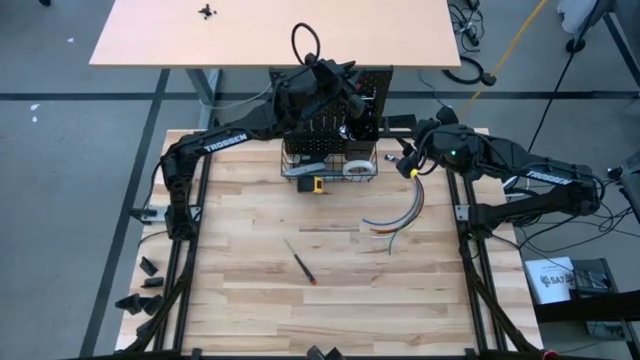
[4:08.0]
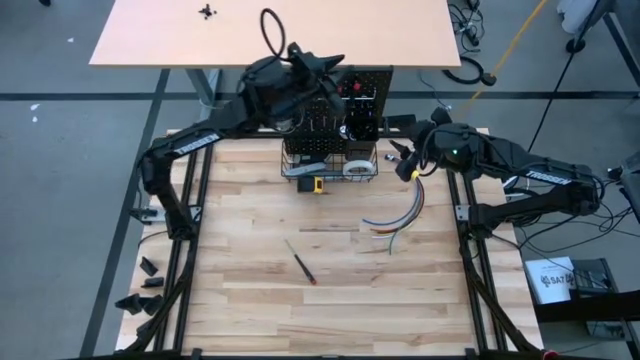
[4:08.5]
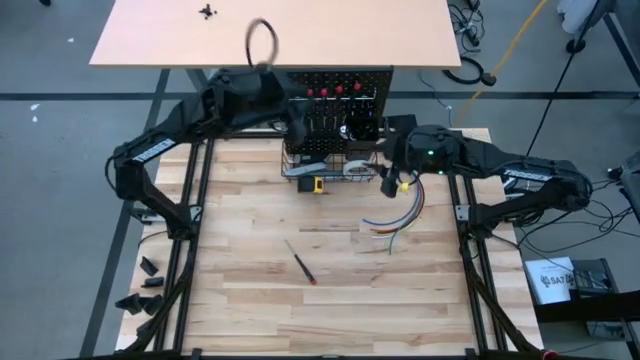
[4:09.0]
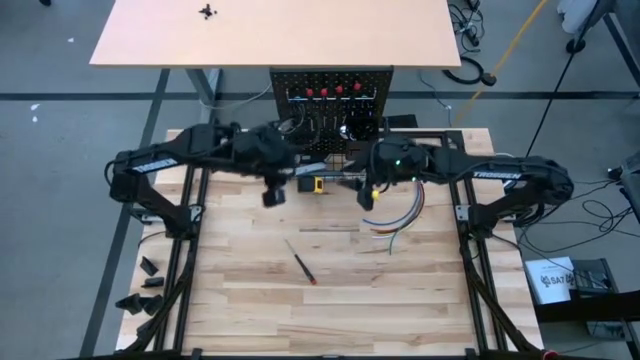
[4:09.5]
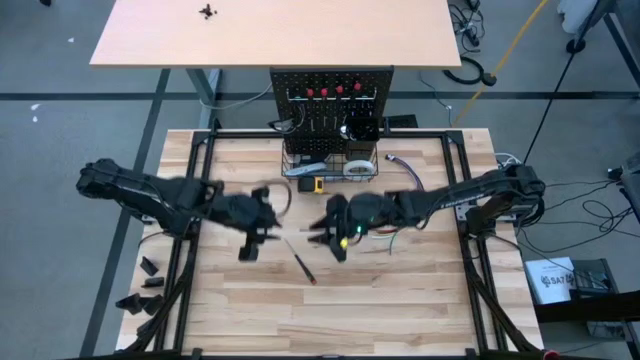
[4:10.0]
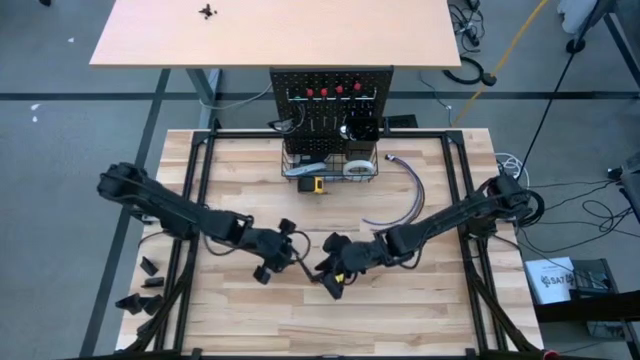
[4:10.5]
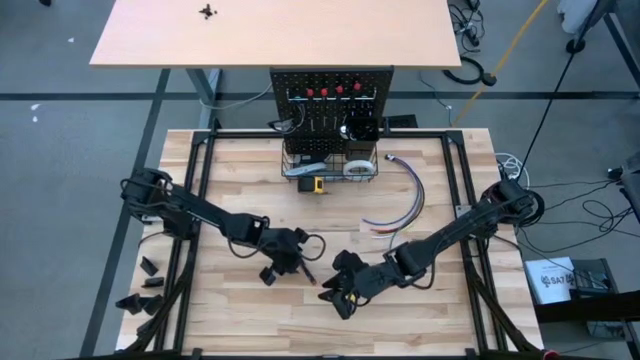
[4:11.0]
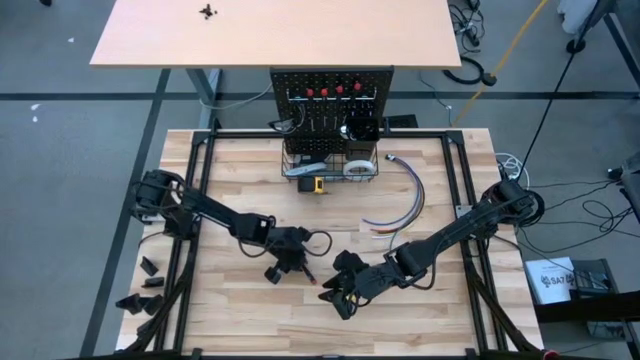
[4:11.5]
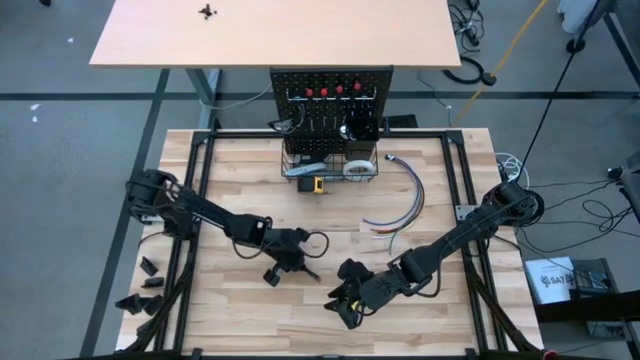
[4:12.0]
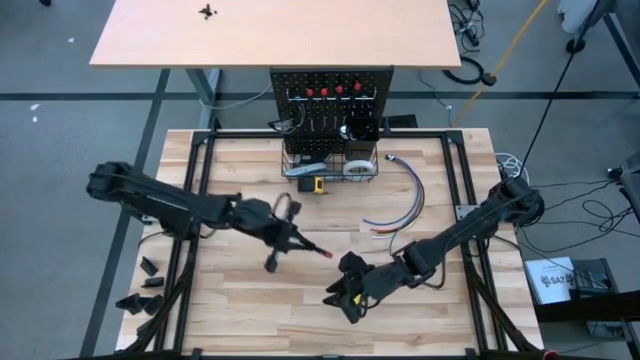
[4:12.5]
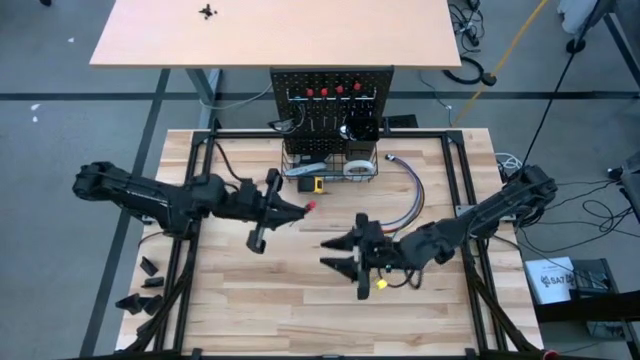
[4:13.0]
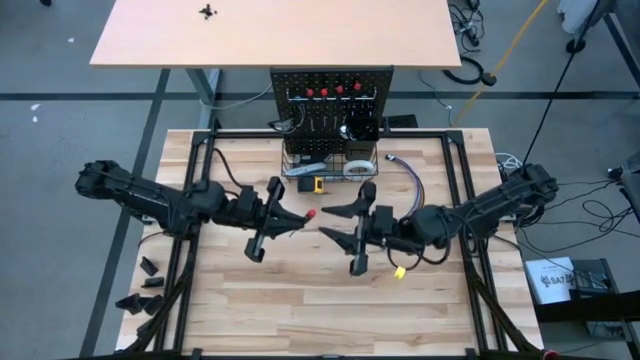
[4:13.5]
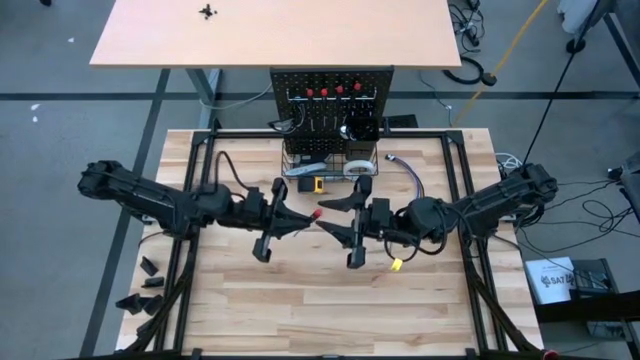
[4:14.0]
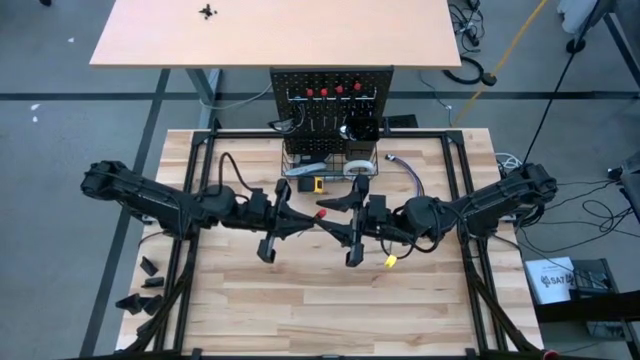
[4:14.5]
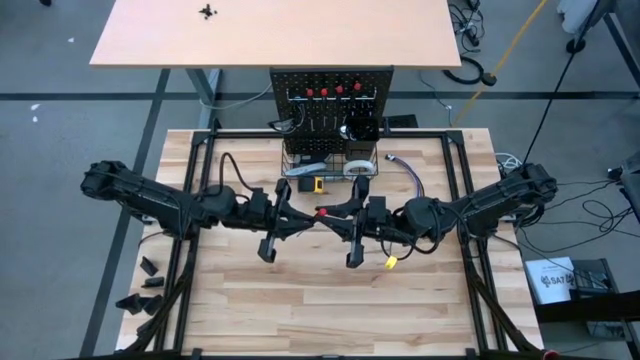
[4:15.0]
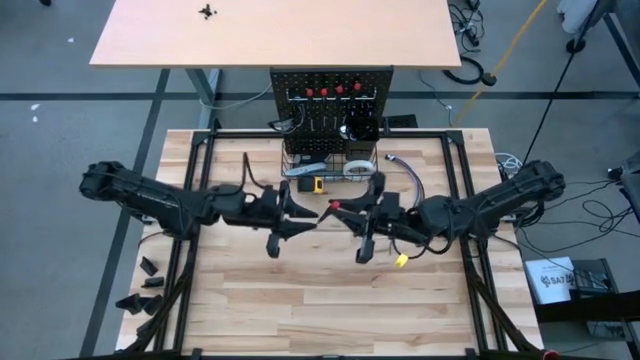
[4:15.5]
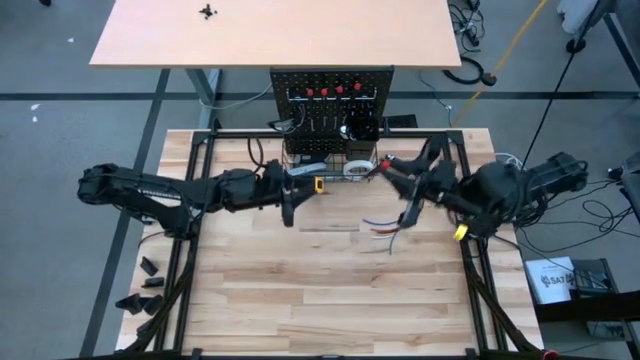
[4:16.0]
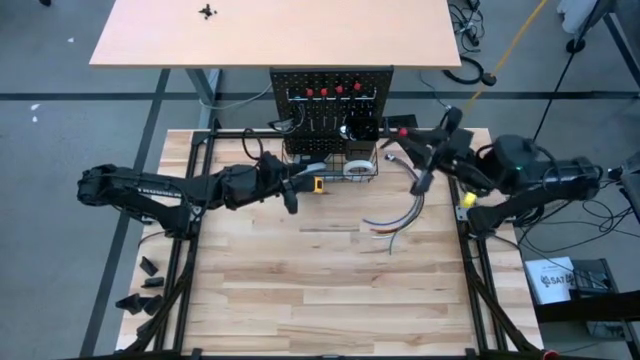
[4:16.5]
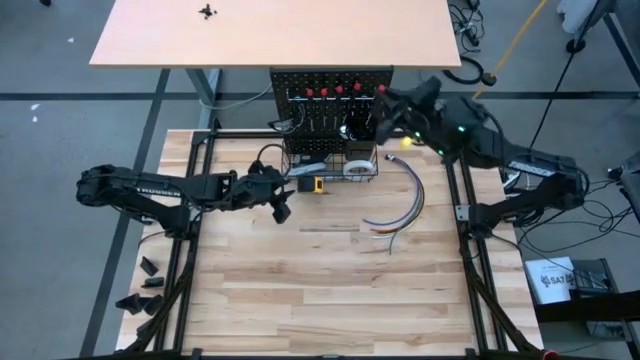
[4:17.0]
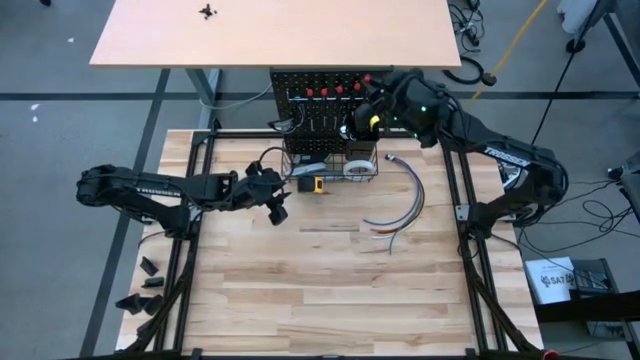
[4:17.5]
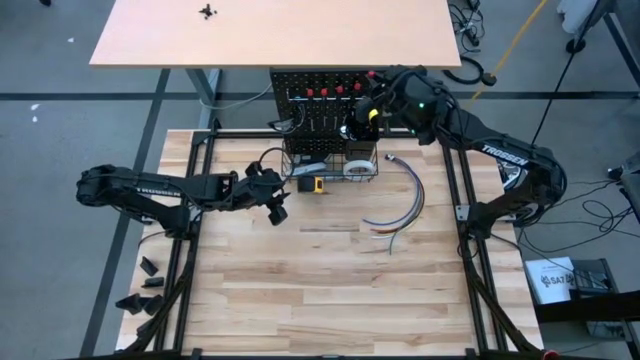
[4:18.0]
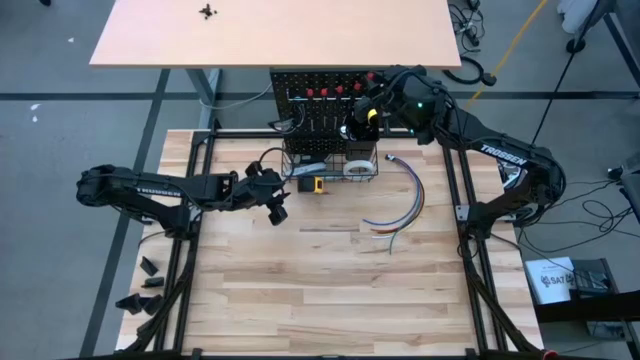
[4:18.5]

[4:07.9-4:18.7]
Task: Hang tools onto peg board
Hang the screwdriver on the pegboard

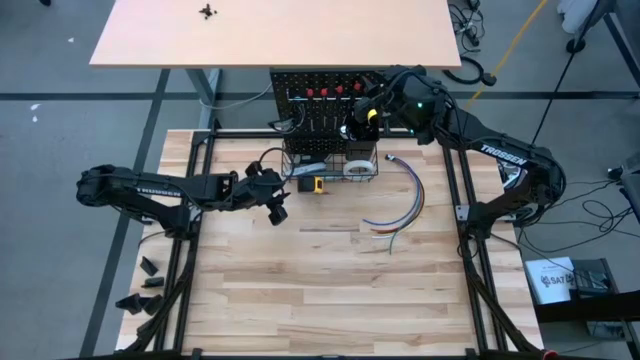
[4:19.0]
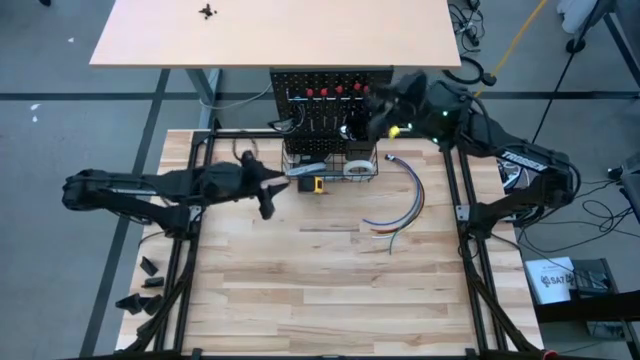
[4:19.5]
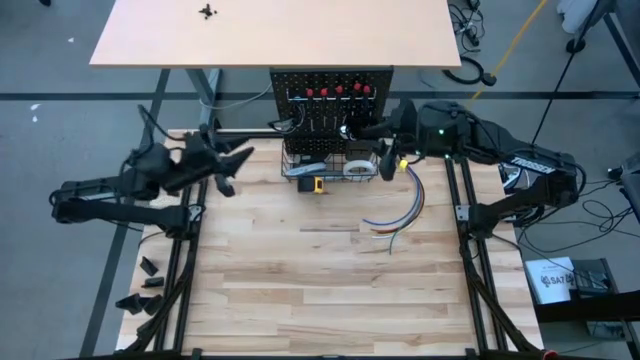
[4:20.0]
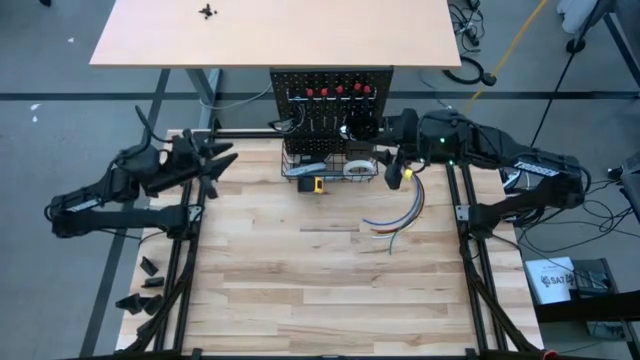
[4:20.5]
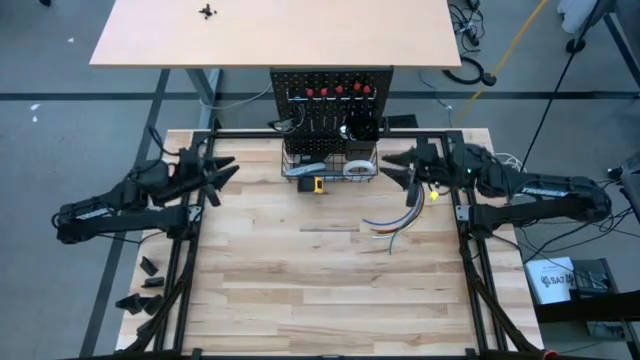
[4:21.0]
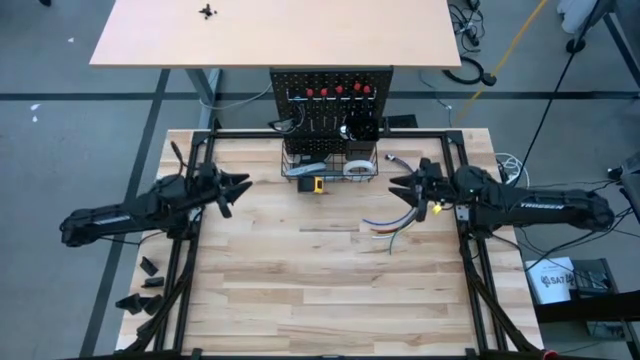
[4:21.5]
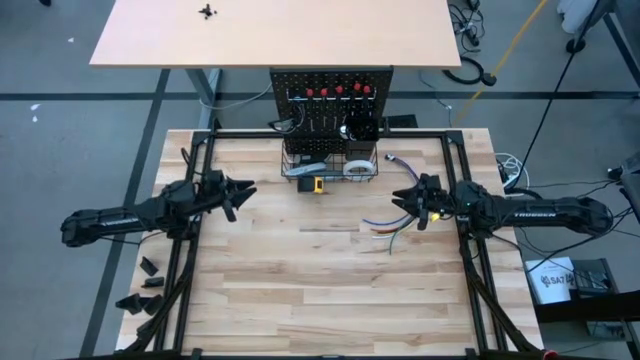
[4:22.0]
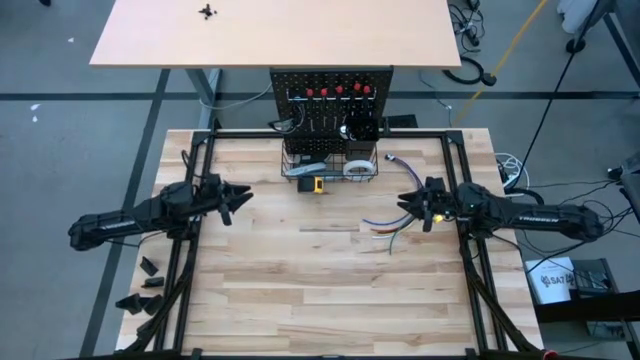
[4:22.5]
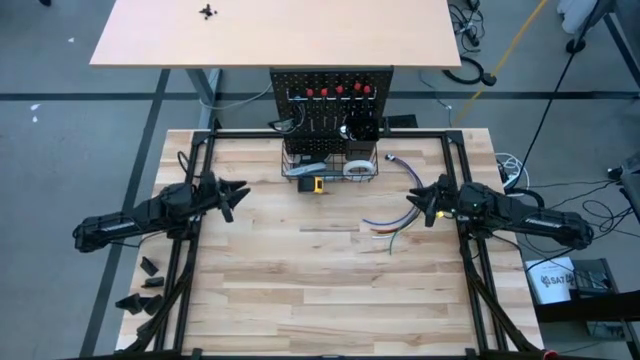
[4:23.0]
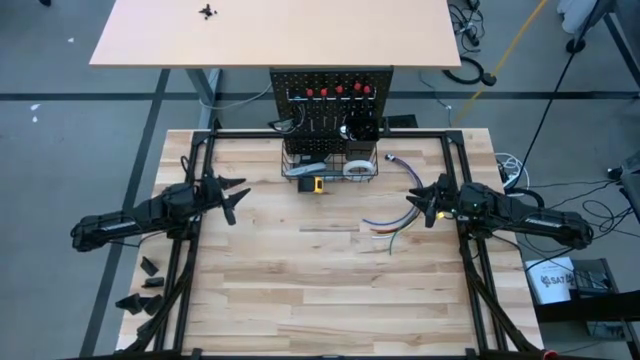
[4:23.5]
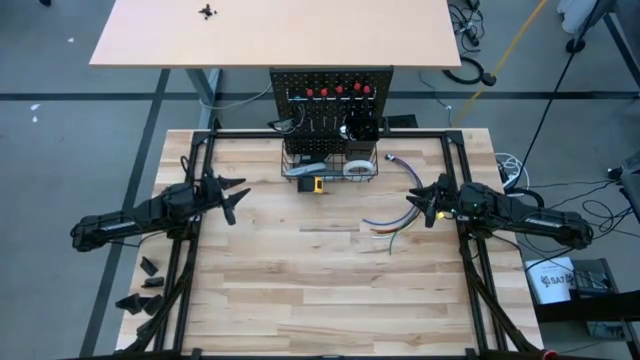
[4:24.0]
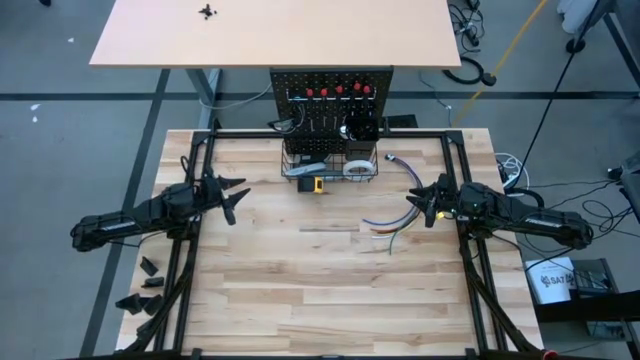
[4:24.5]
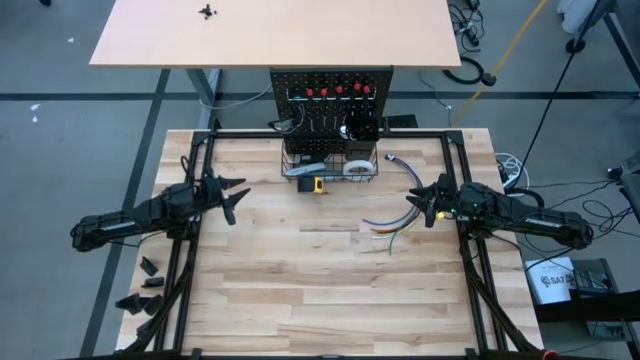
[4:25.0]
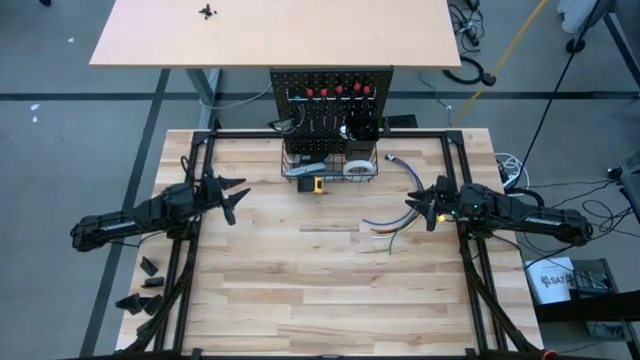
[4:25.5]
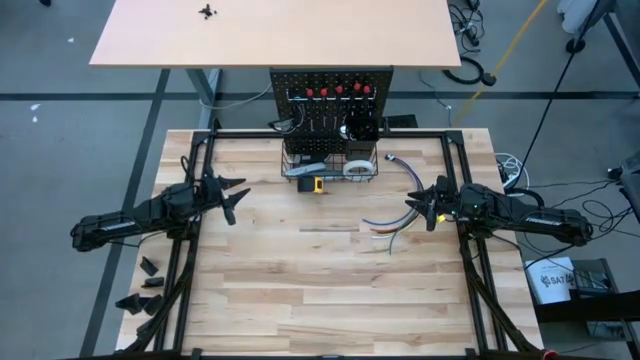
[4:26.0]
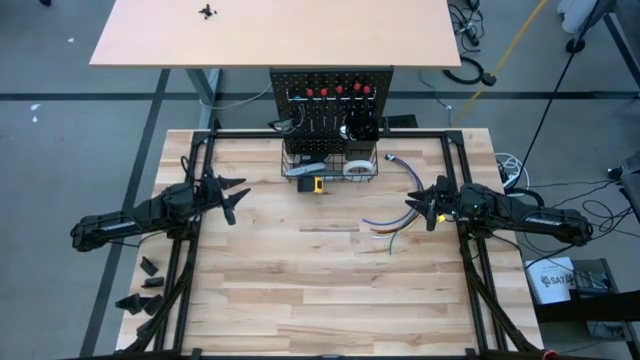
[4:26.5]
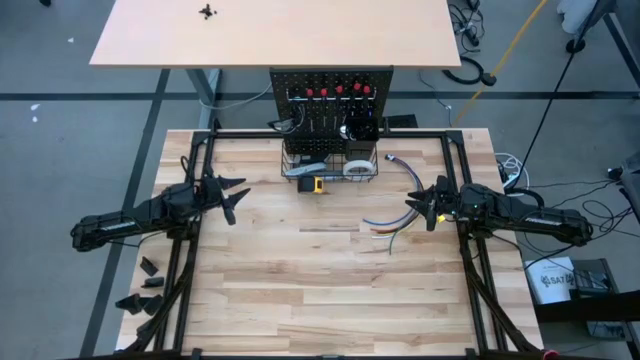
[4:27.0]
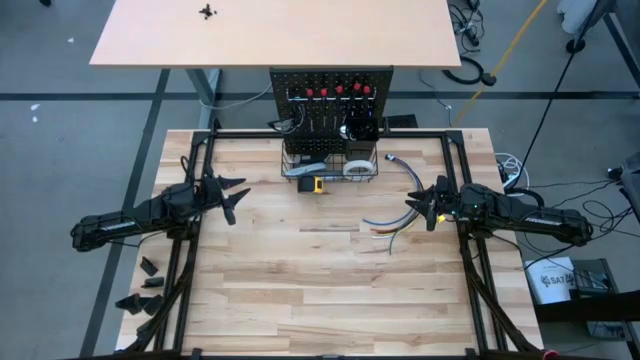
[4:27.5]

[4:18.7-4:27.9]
Return to Home Position
